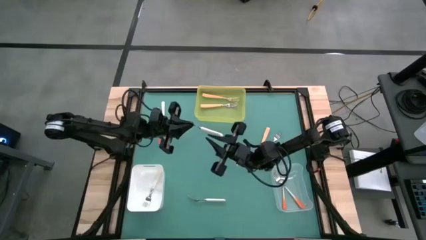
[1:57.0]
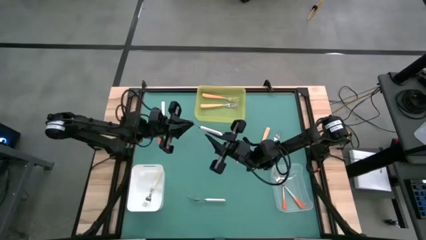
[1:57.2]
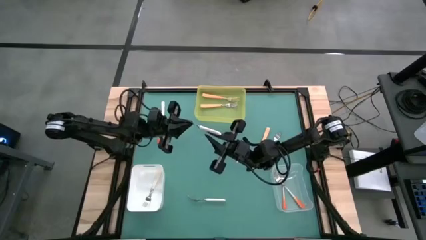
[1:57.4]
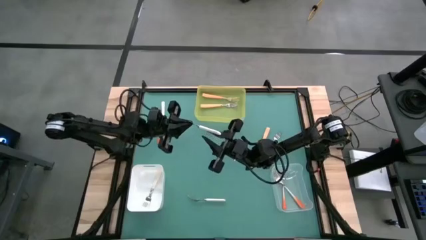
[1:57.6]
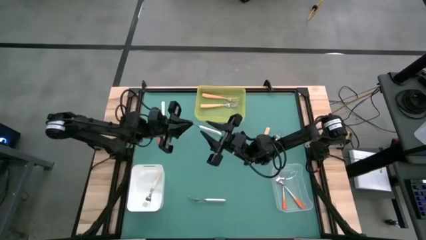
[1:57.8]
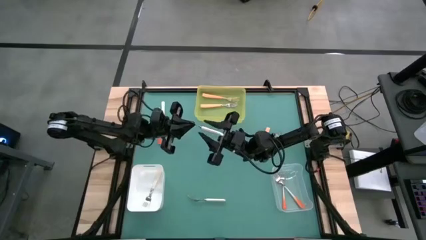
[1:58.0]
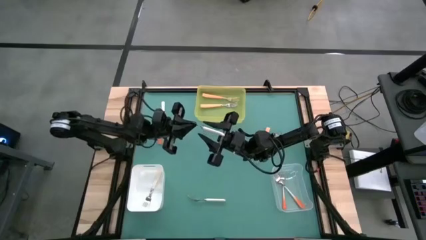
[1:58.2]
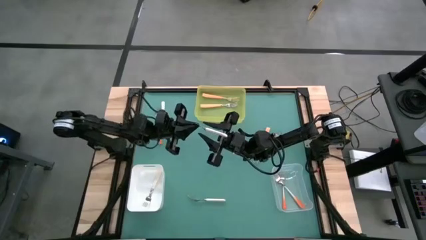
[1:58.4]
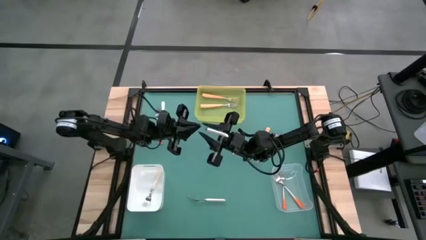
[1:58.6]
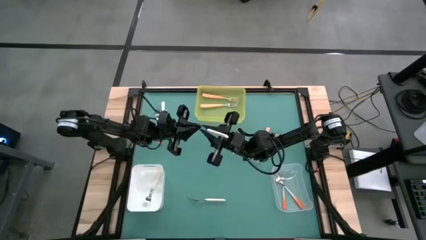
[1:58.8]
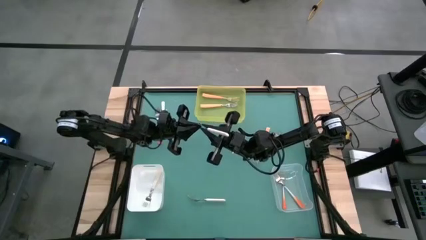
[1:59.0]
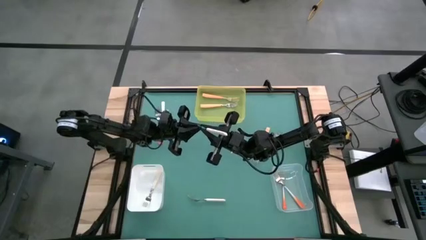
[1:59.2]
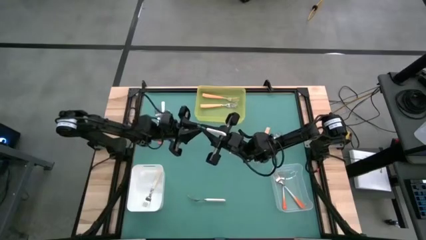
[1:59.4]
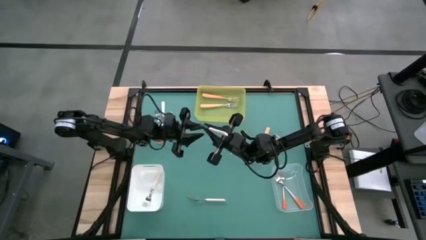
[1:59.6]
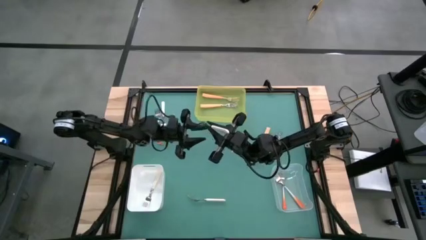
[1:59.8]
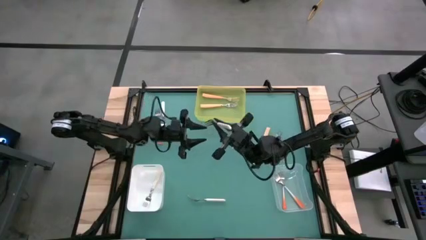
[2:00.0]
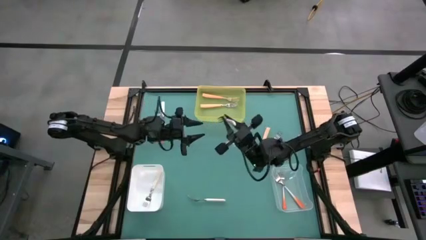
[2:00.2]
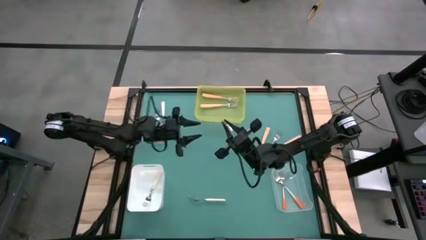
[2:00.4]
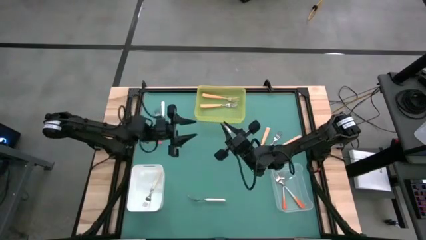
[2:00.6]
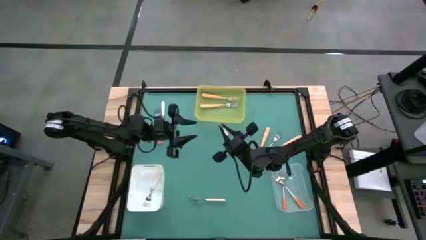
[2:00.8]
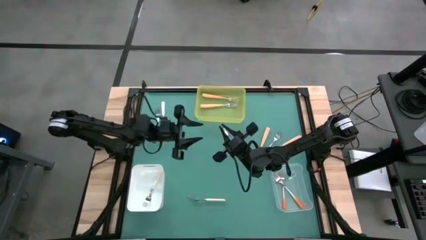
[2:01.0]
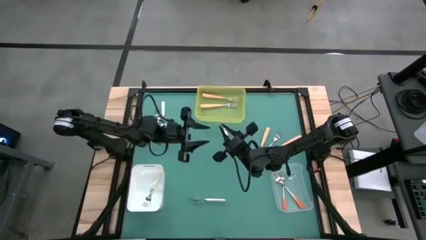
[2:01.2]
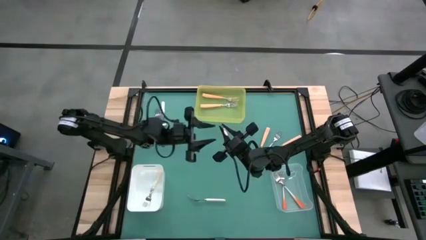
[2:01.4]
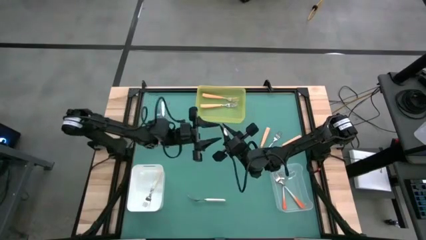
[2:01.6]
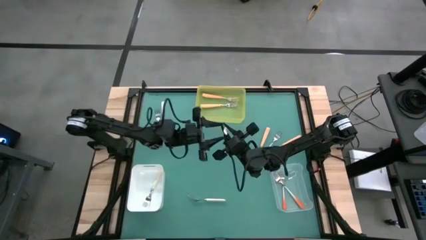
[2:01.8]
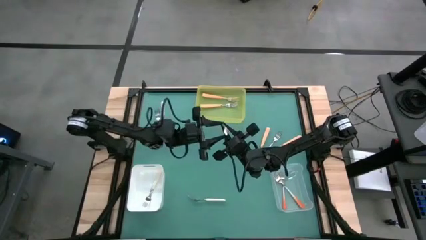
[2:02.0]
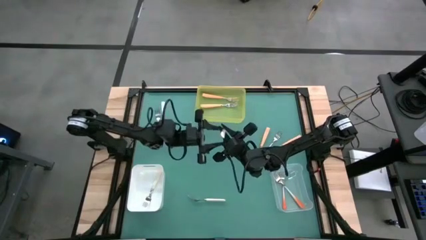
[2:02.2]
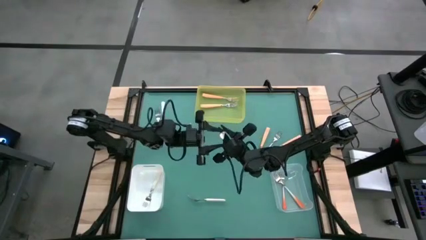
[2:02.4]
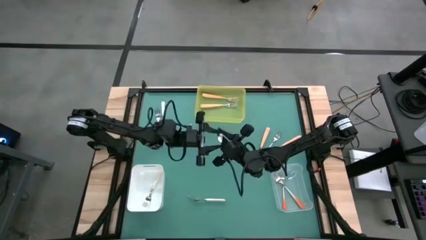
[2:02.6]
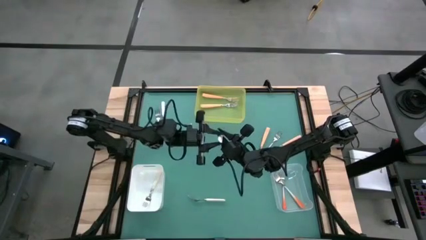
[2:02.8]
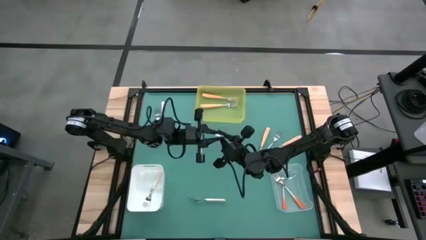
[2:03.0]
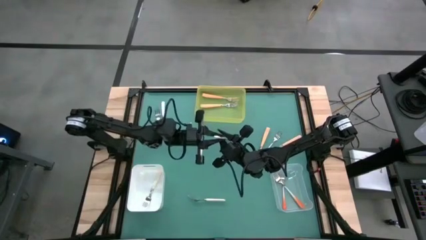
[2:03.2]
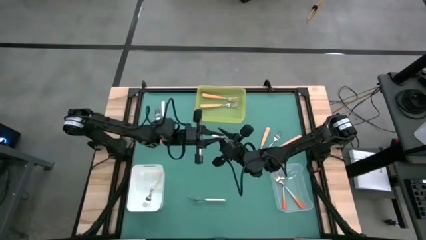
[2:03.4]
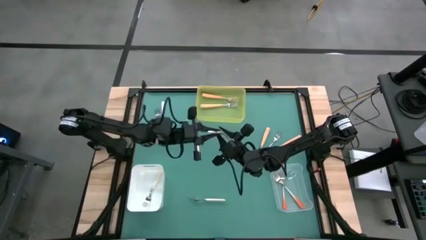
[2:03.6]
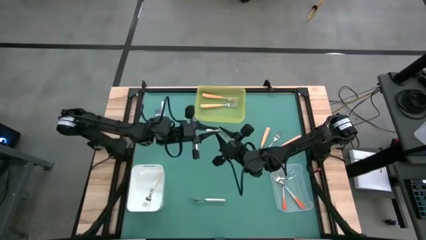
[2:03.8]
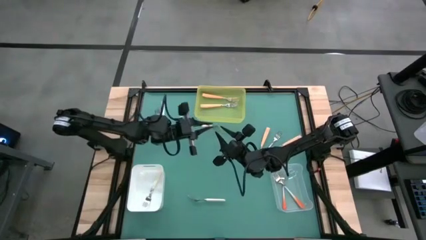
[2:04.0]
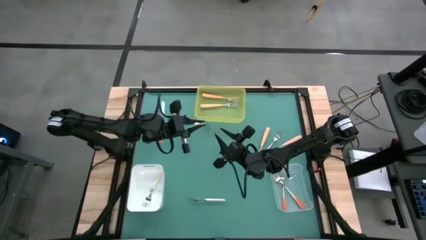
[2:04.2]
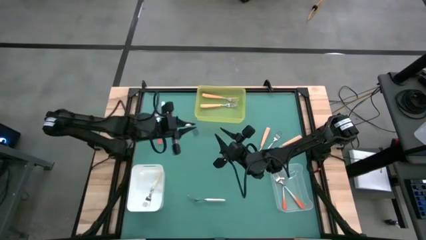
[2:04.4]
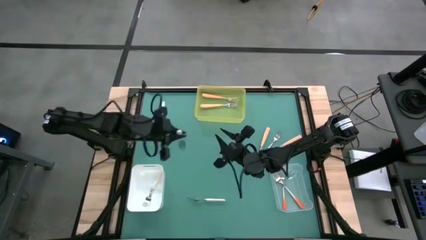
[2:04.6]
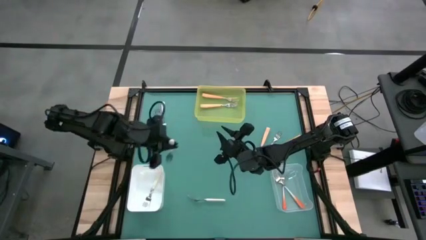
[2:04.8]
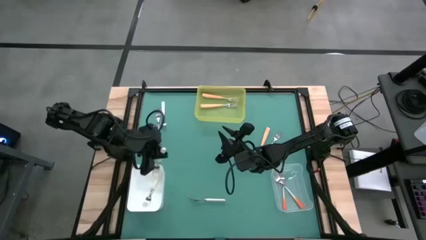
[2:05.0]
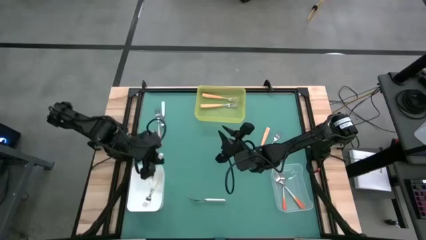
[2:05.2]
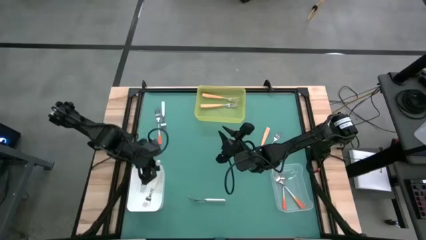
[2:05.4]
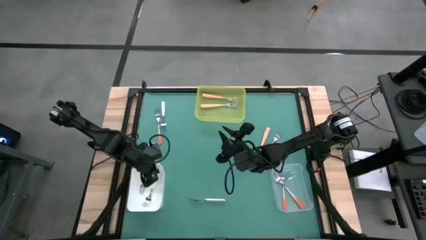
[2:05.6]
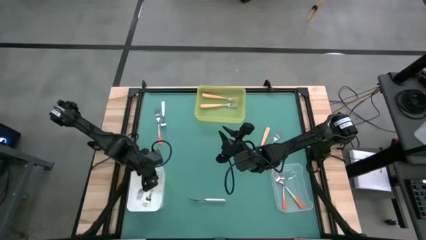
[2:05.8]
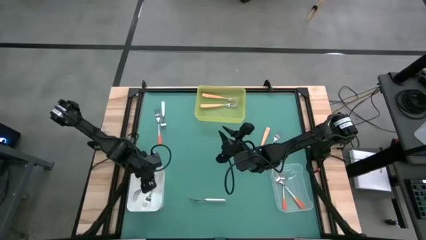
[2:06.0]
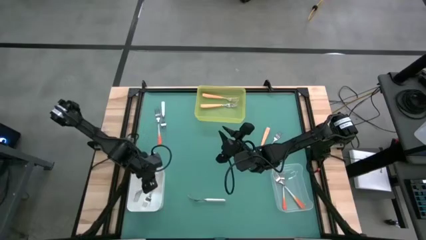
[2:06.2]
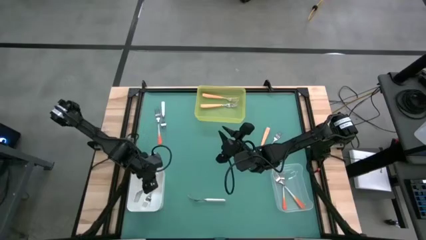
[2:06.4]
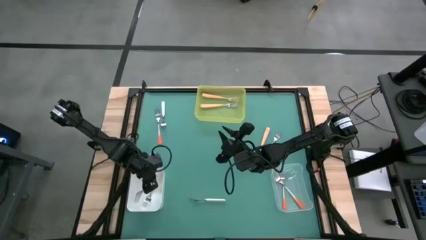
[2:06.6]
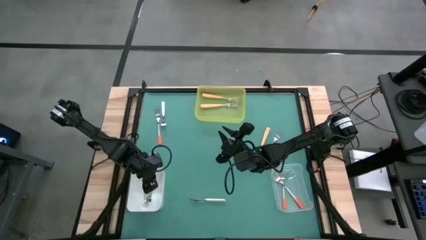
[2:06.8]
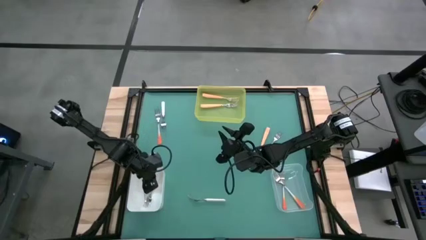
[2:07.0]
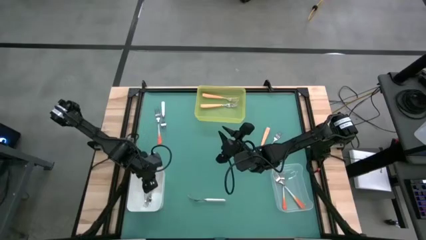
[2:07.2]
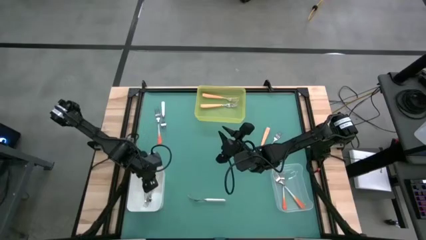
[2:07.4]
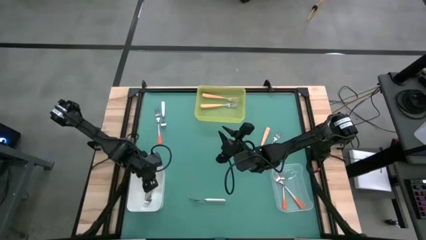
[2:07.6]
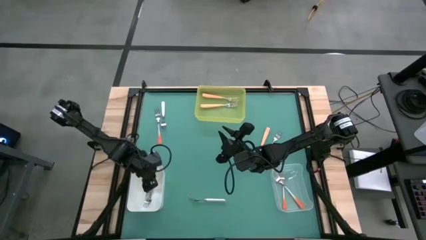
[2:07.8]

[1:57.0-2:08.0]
Task: Sort silverware by color (type)
Put the white fork into the white bin
